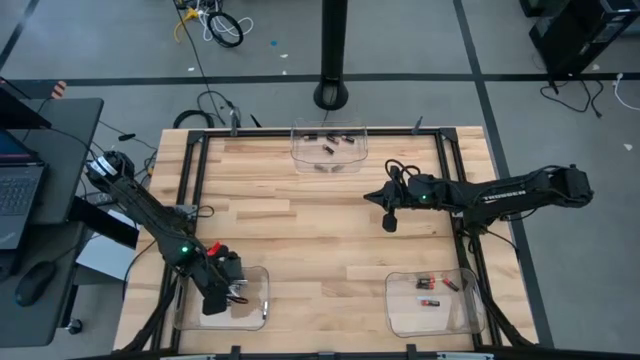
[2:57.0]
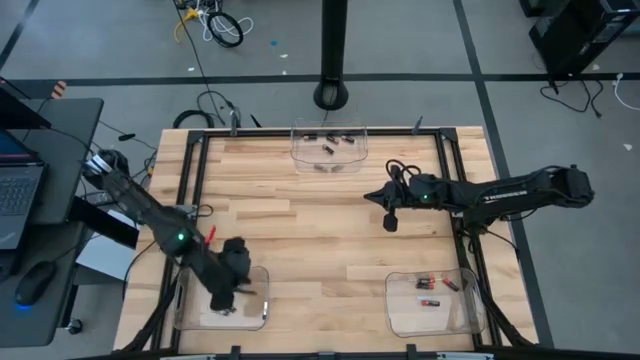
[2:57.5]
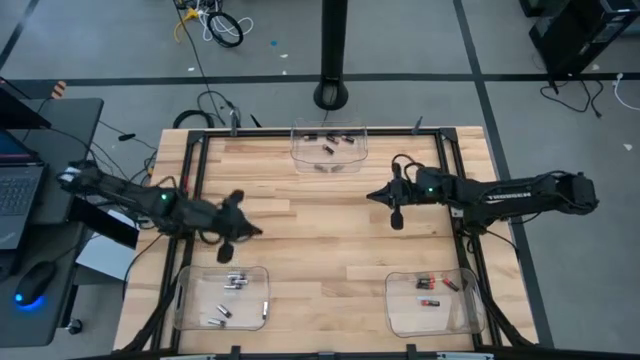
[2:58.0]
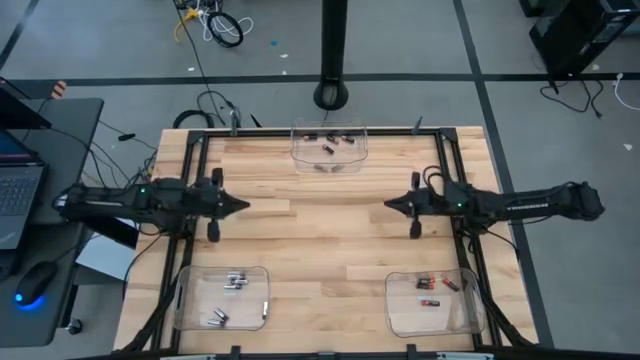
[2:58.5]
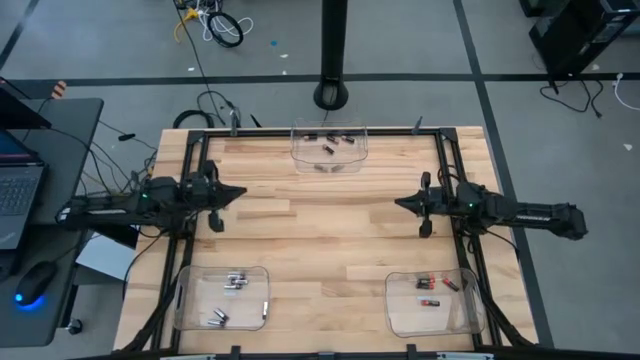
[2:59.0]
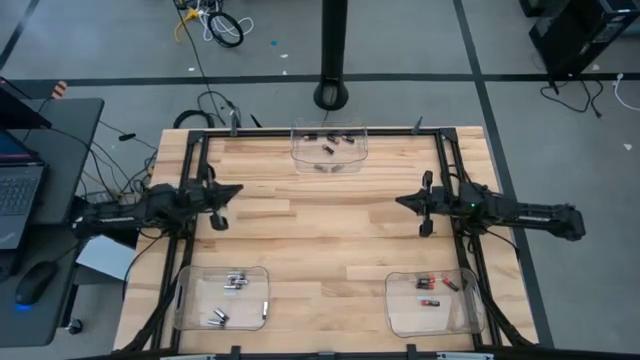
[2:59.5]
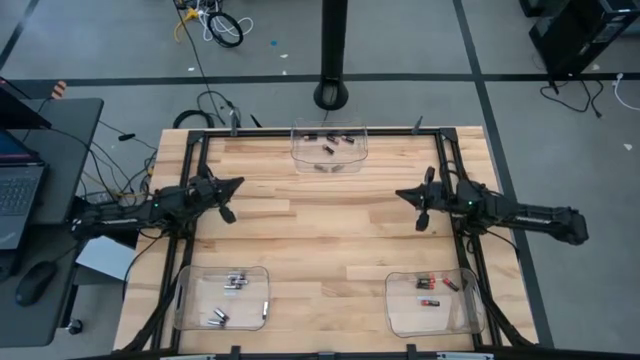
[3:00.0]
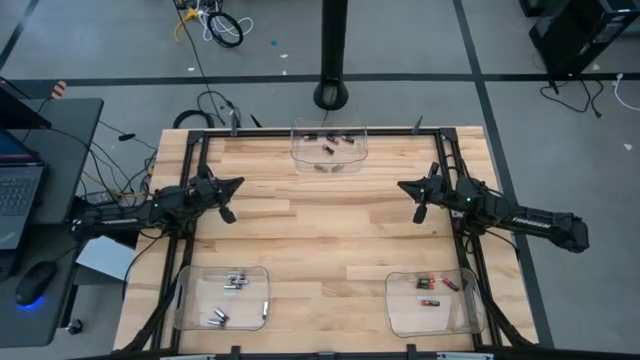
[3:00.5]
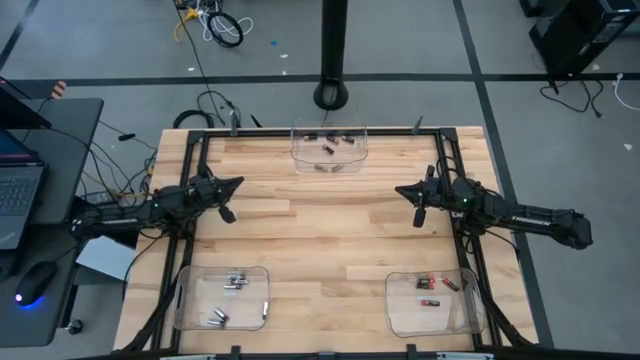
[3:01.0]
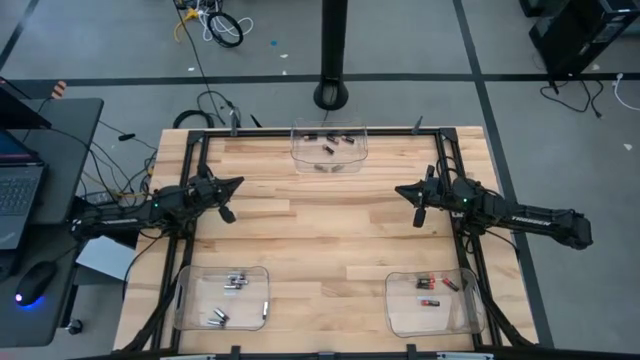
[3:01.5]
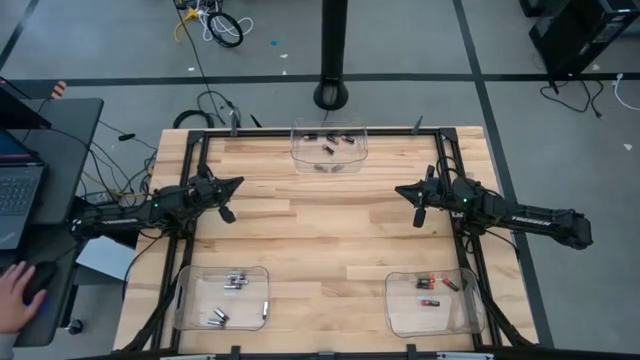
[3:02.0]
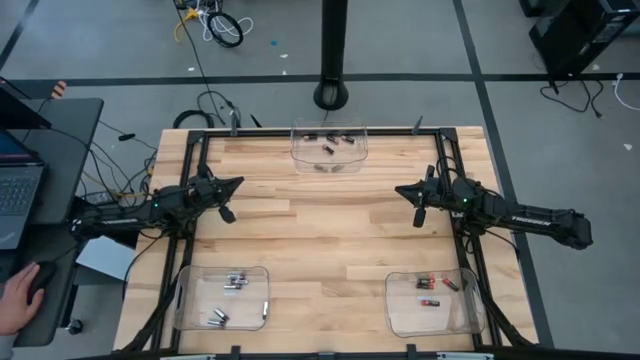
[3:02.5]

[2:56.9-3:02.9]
Task: Sort batteries
Return to Home Position

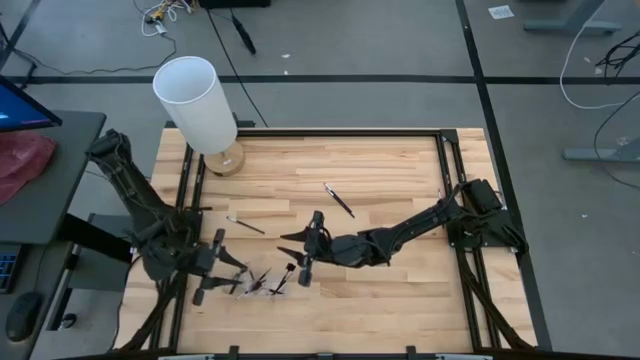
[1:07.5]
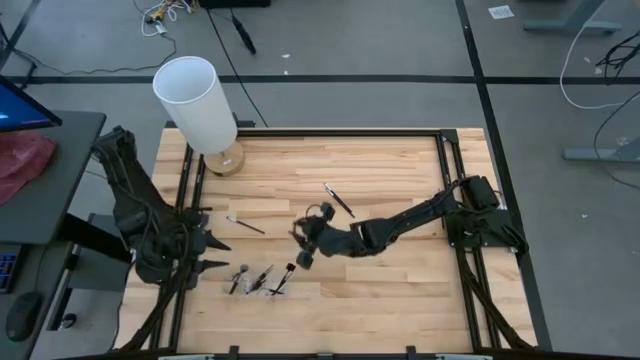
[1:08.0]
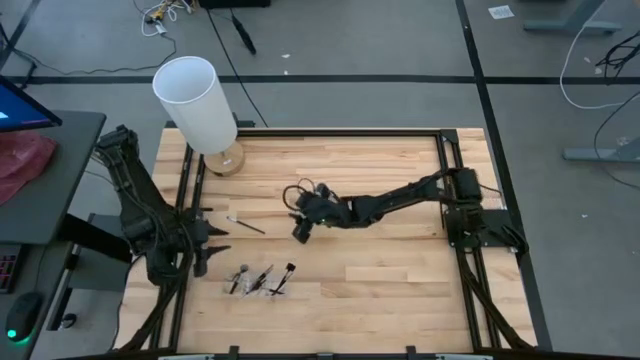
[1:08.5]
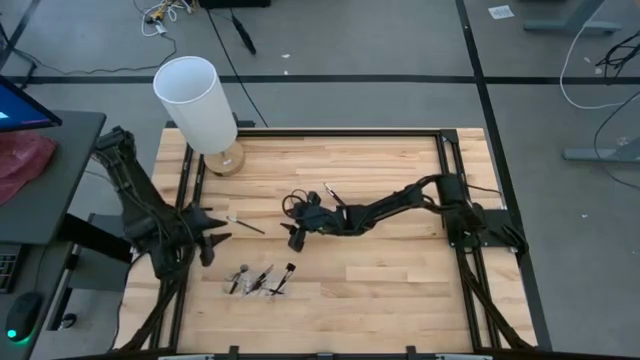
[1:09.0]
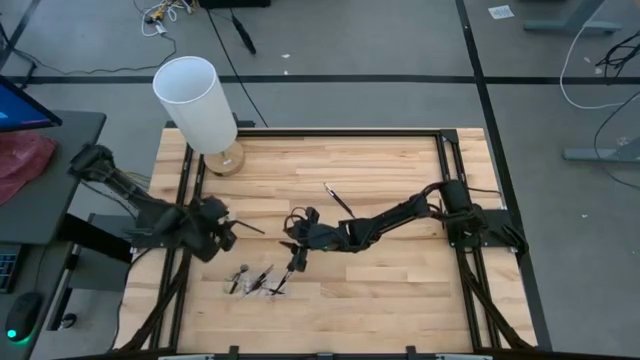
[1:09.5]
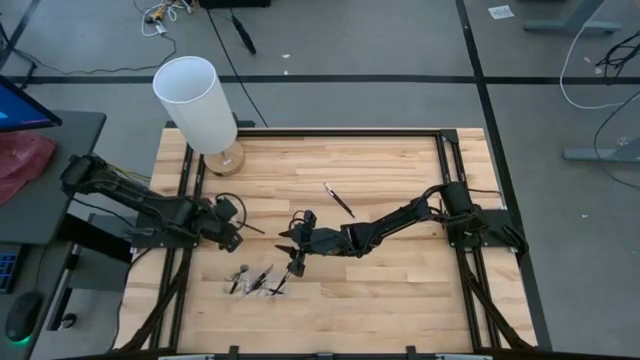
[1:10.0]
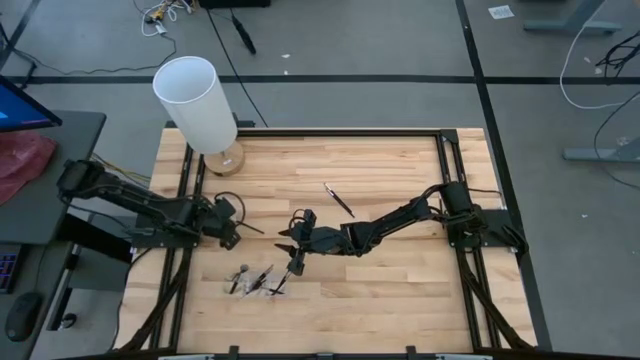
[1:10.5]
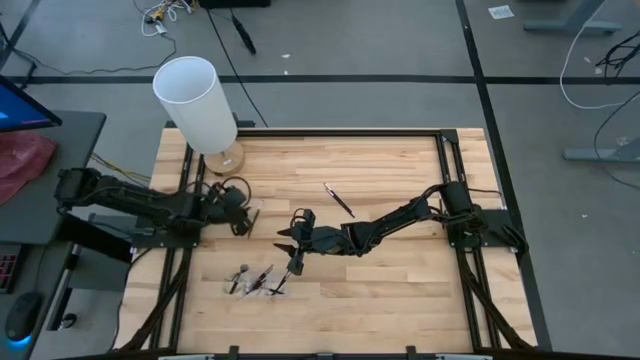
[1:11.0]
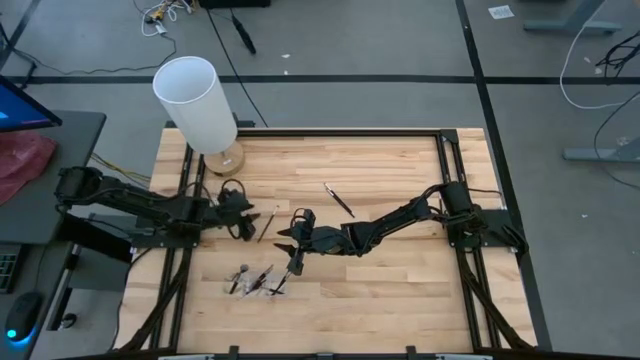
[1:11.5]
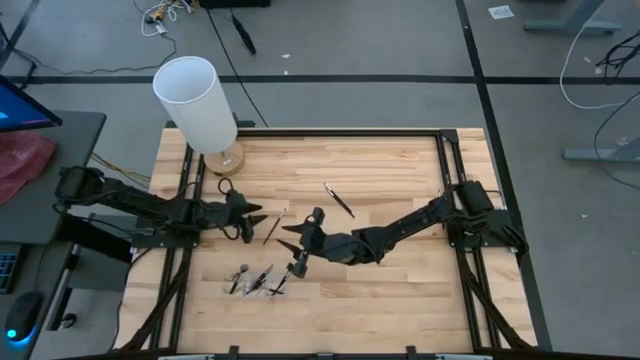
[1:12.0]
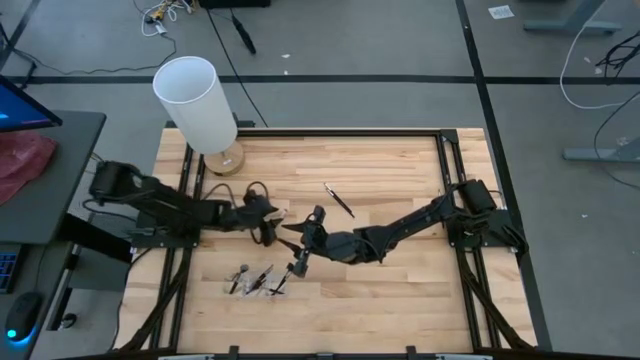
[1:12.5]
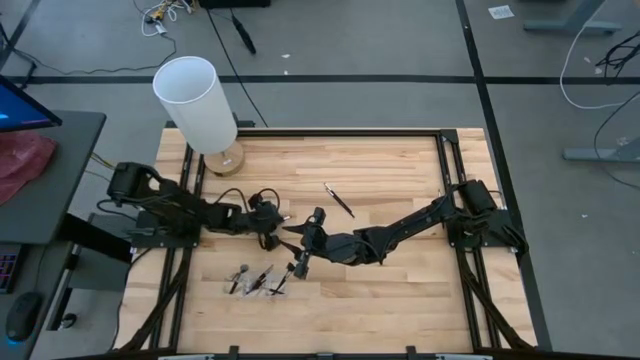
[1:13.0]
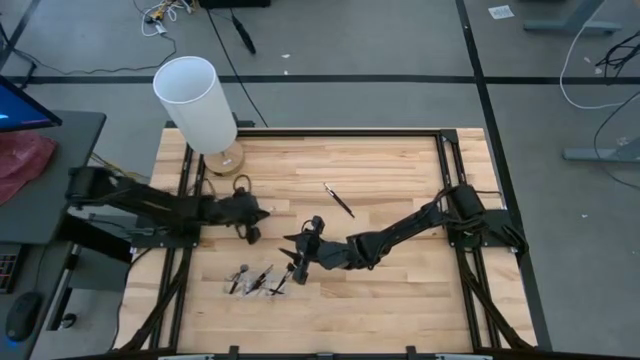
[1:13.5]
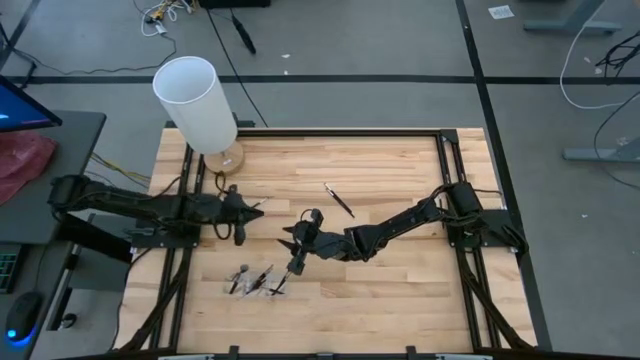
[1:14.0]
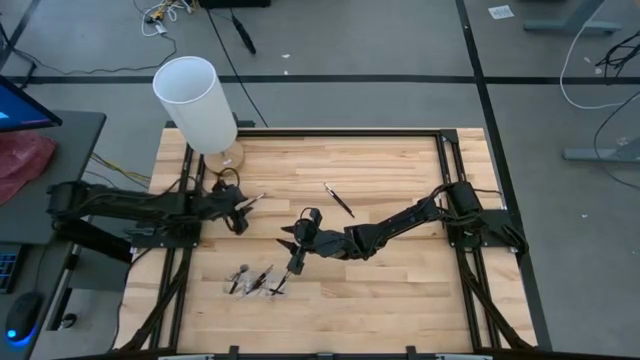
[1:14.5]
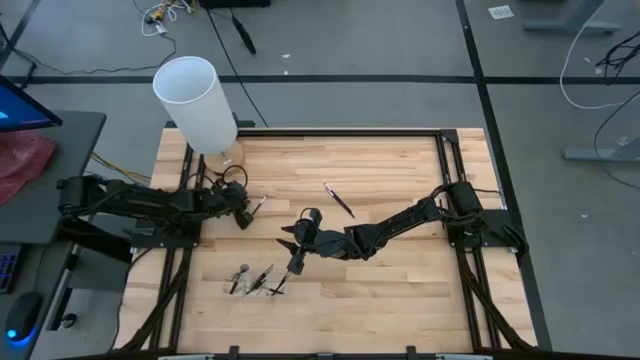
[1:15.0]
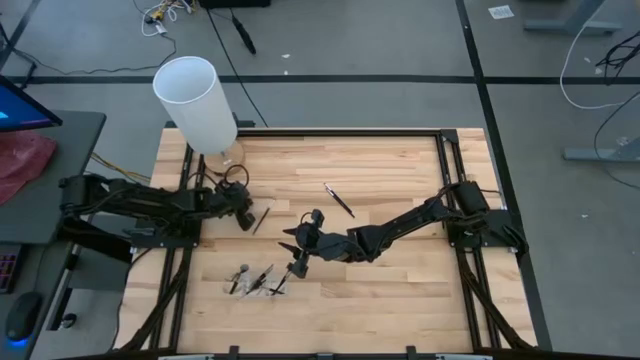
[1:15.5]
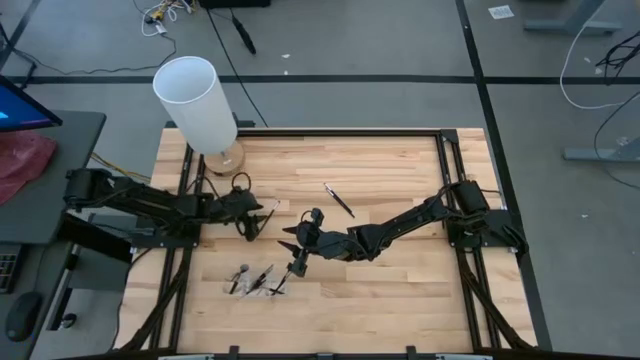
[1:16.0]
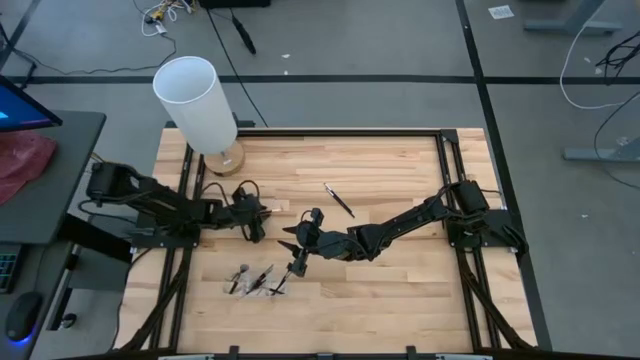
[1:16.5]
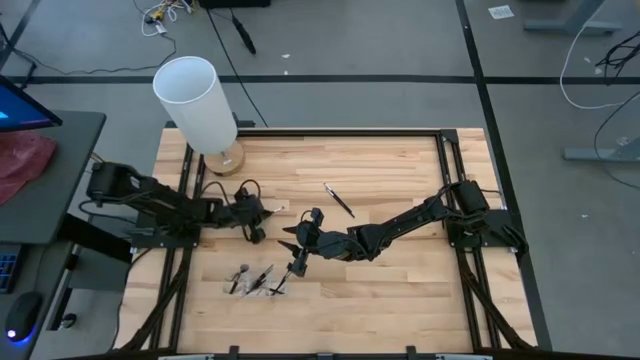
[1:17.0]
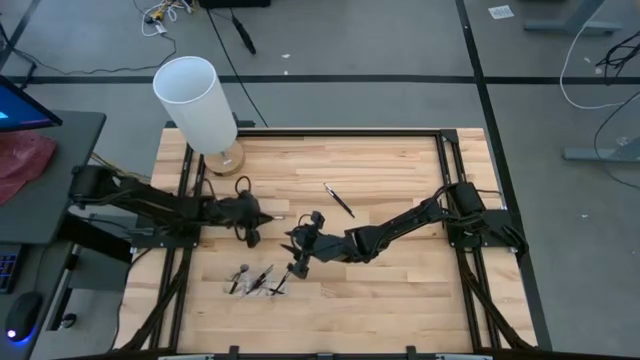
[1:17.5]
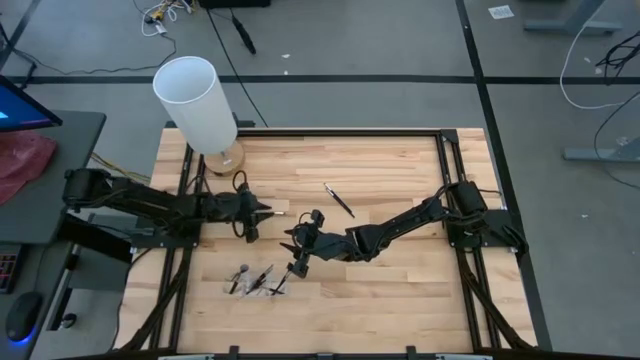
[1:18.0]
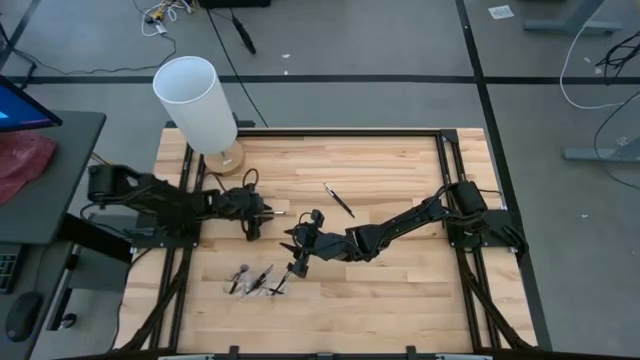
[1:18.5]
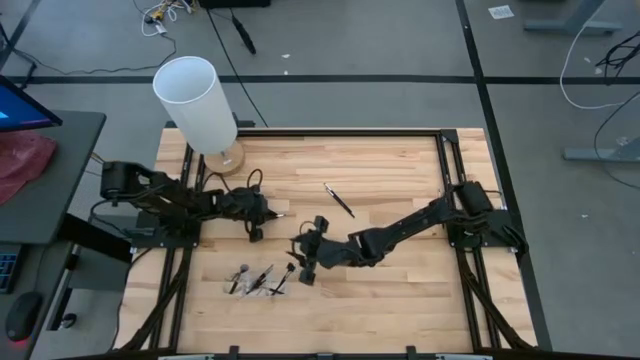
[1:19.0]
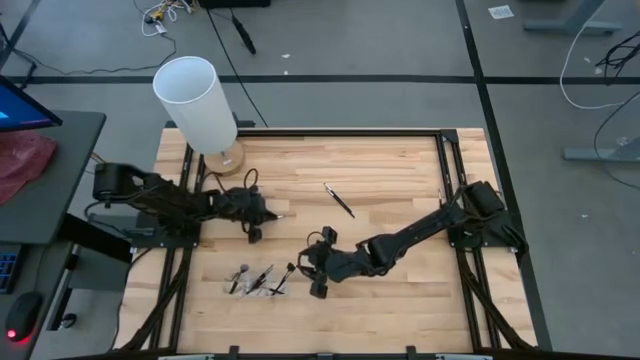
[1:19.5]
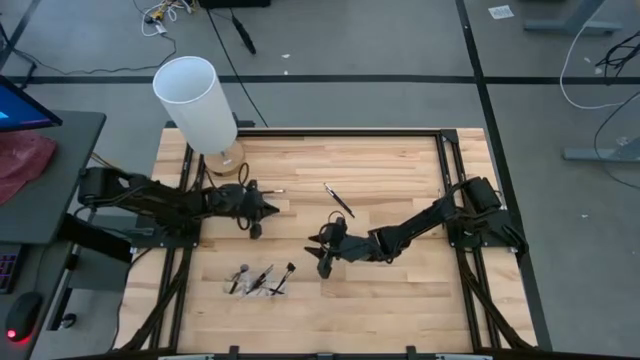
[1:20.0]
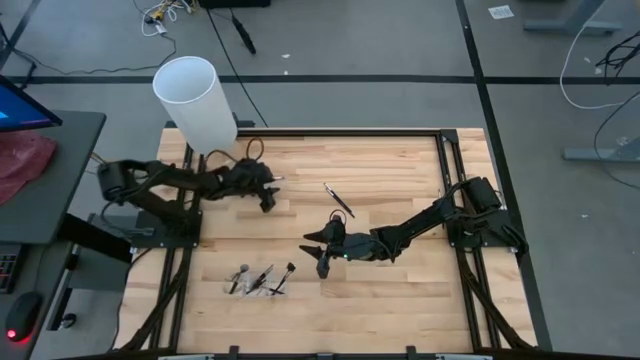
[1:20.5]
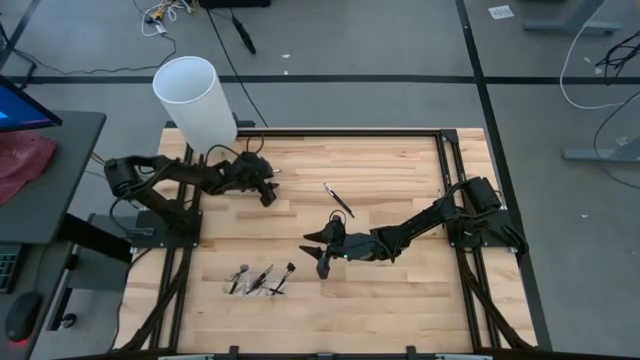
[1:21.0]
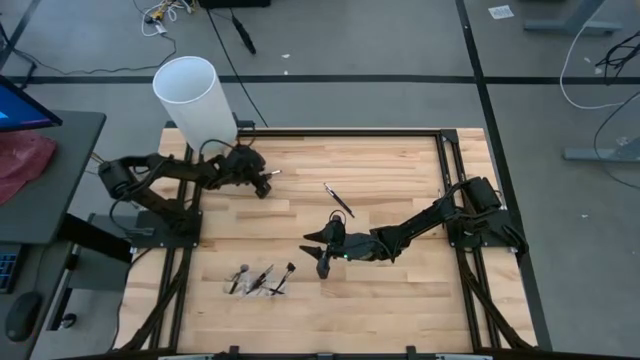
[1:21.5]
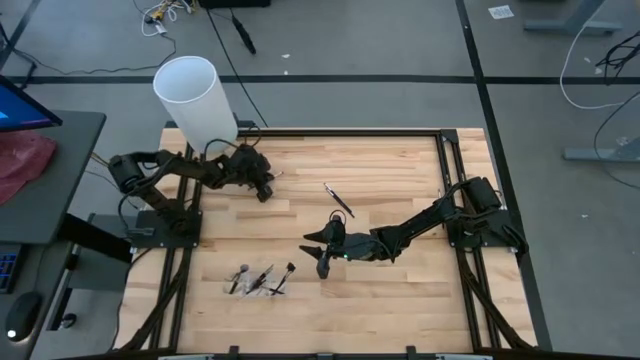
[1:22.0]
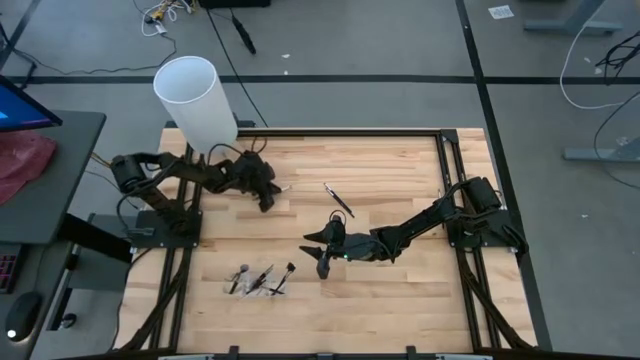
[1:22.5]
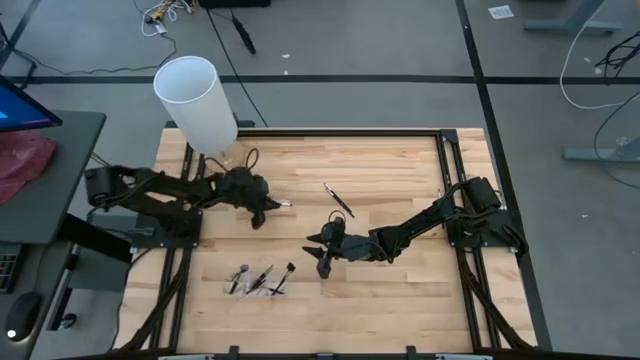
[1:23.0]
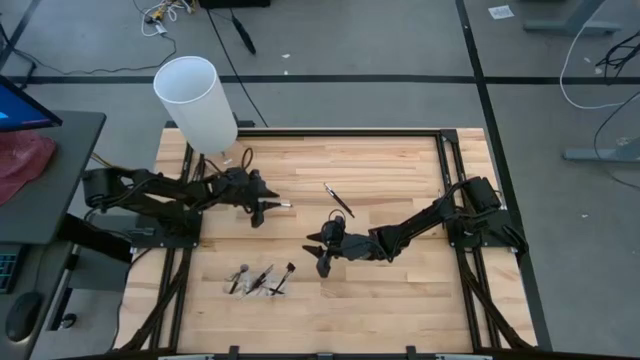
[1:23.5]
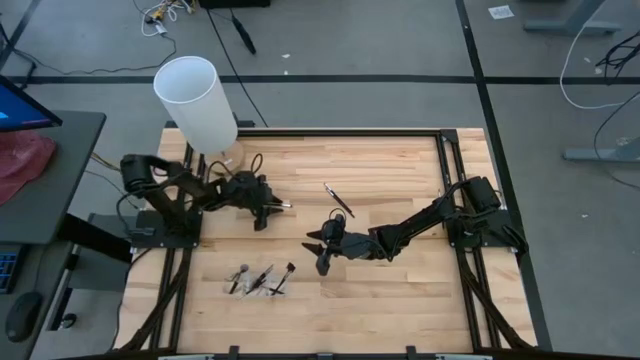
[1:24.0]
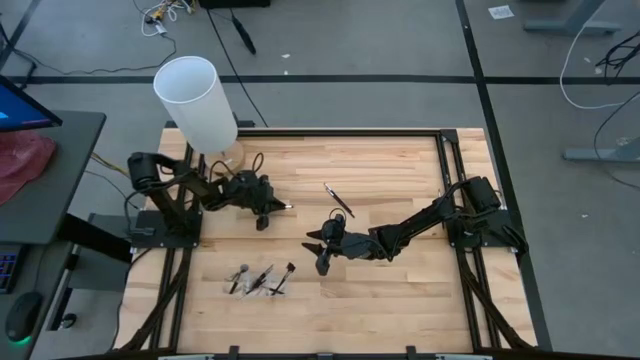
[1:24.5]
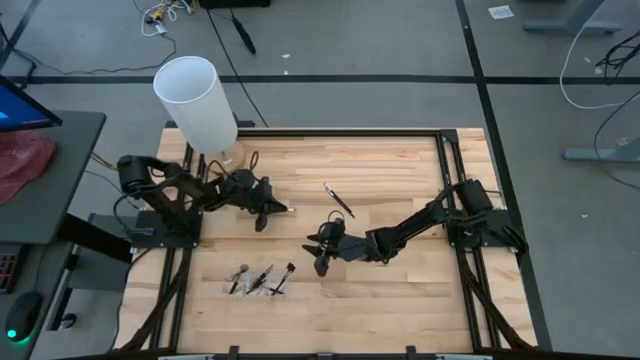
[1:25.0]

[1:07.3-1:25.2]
Task: Put items in baskets/containers
Put the eyeshadow brush into the transparent organizer
